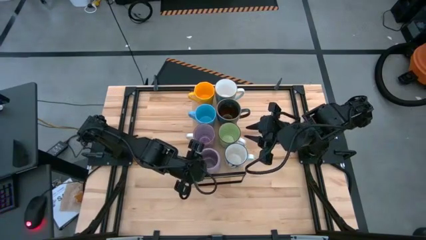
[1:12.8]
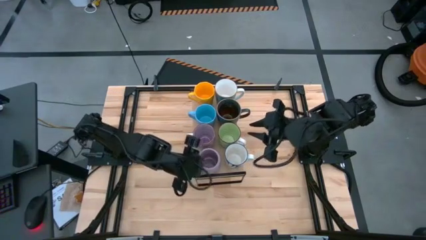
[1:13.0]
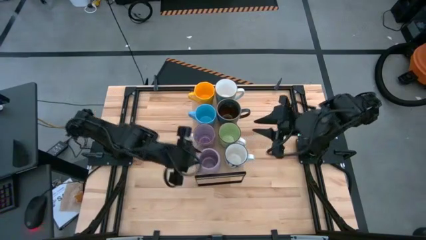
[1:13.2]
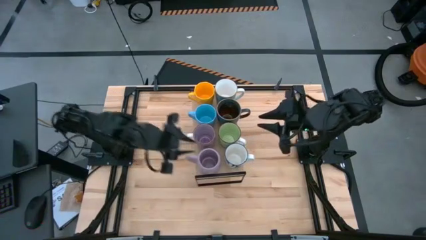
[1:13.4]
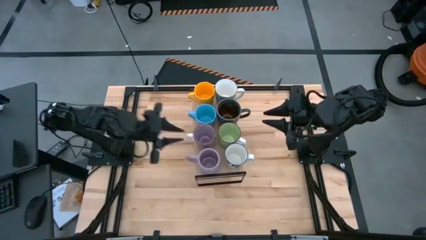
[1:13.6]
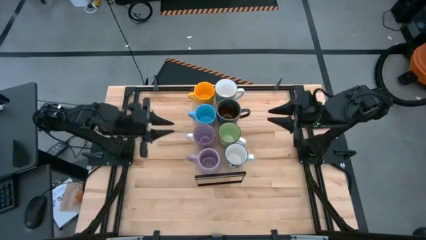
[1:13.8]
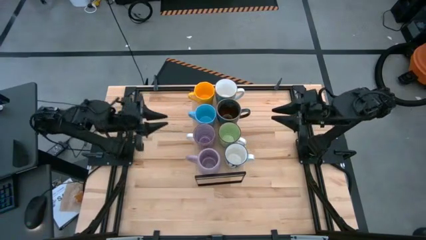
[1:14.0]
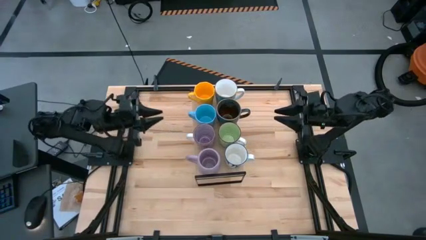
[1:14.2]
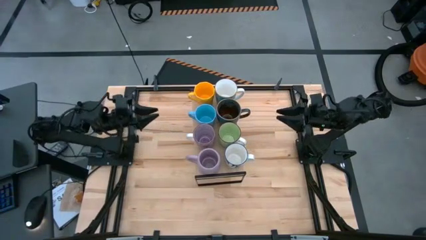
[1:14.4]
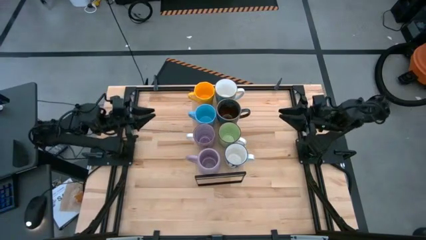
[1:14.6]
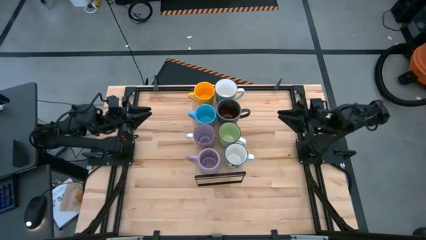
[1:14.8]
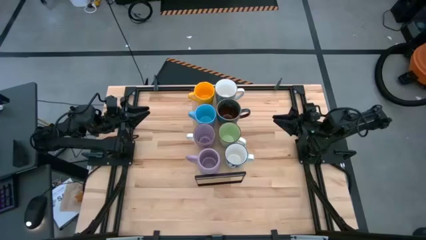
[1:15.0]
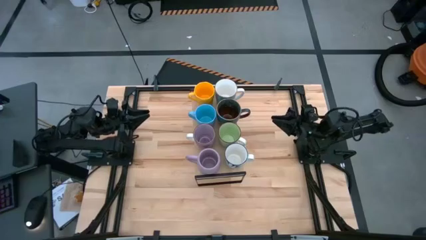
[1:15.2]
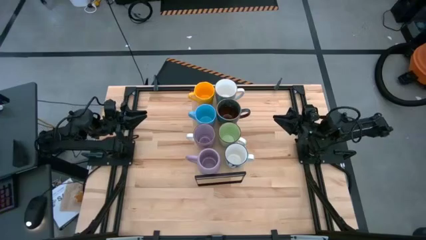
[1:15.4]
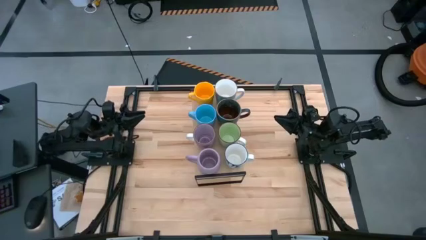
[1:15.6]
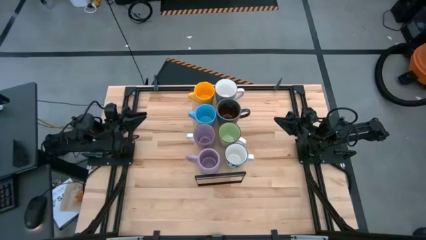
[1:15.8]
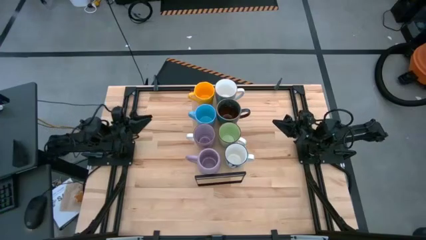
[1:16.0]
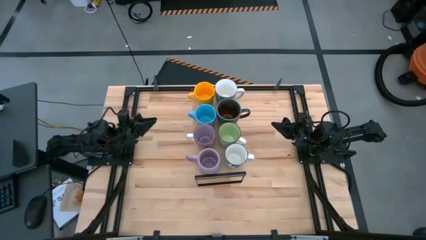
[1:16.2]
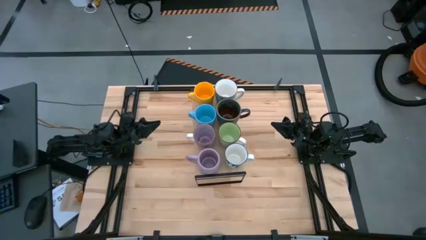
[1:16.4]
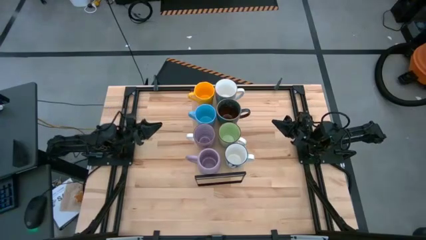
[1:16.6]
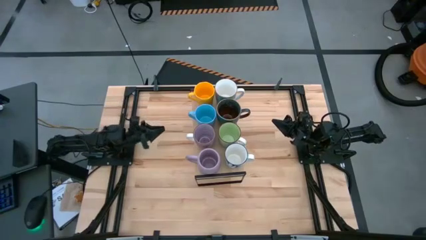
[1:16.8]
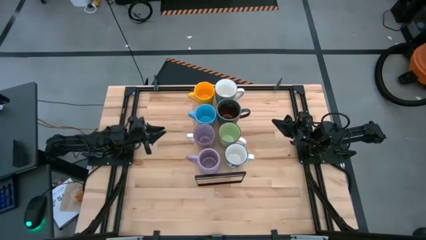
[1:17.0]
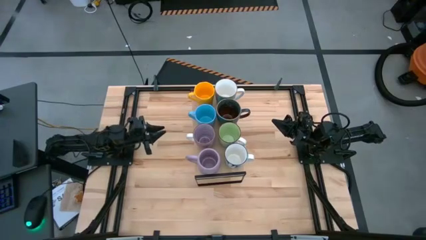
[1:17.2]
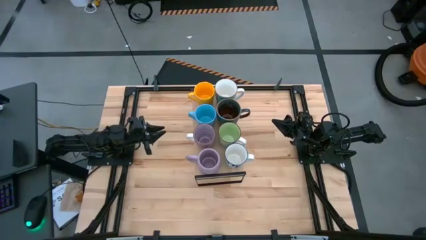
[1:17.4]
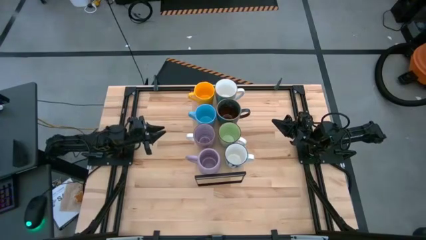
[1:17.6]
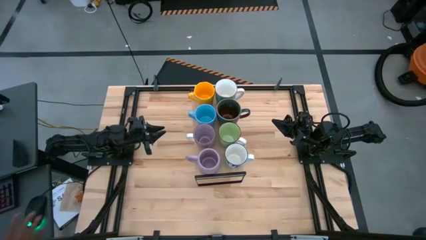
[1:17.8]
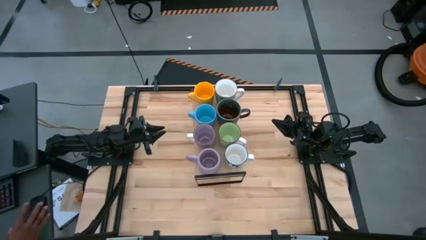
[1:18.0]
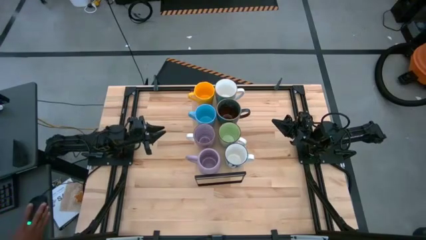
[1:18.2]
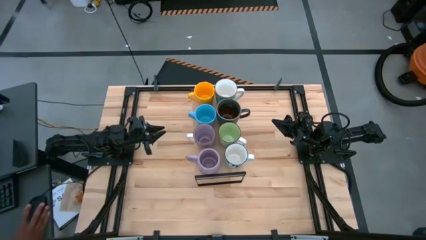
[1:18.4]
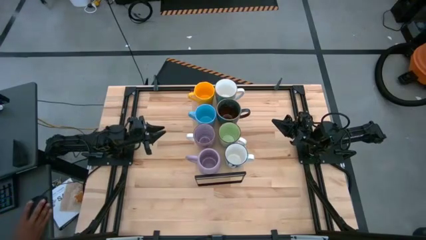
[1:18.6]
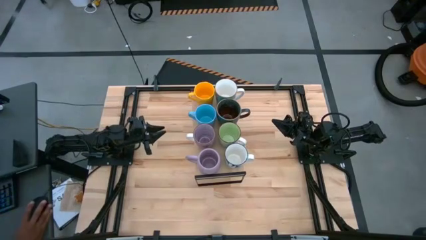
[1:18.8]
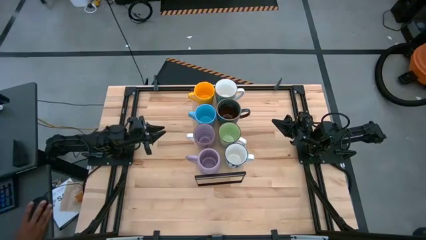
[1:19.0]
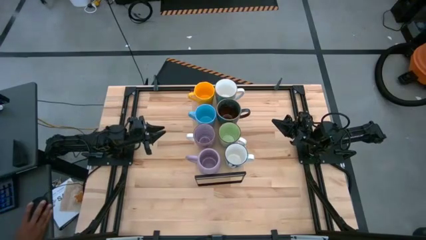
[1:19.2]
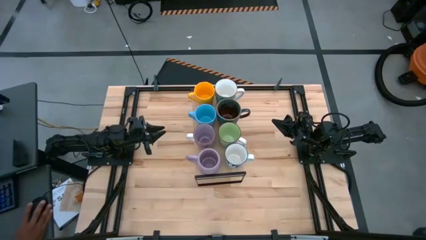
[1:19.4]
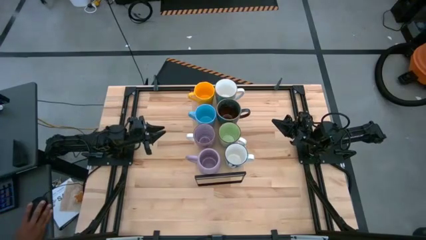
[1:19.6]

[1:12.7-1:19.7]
Task: Place coffee mugs
Return to Home Position

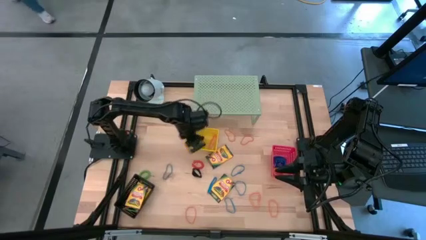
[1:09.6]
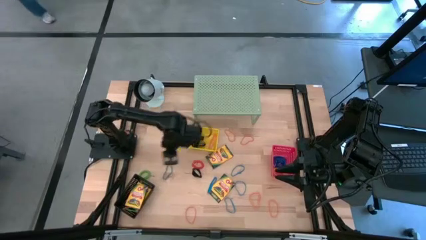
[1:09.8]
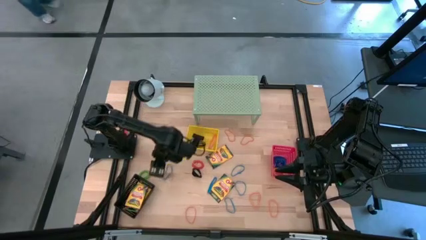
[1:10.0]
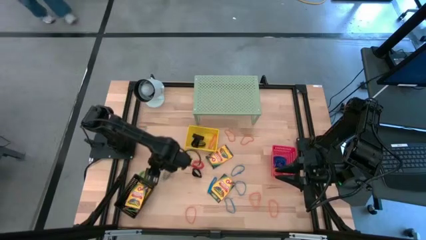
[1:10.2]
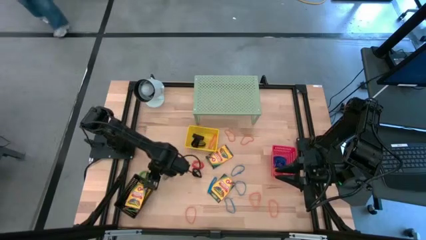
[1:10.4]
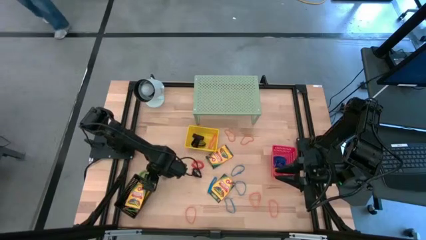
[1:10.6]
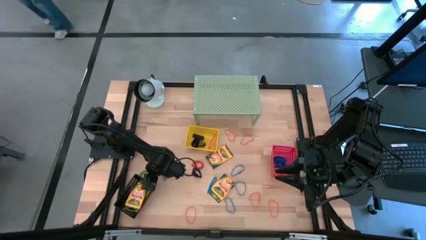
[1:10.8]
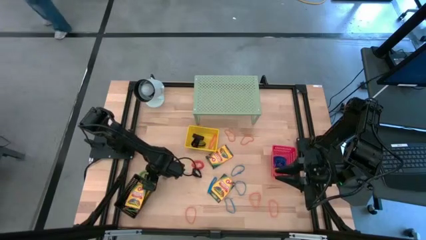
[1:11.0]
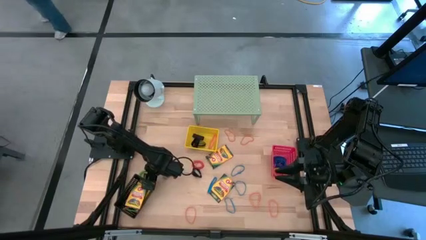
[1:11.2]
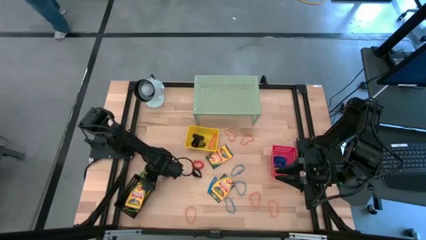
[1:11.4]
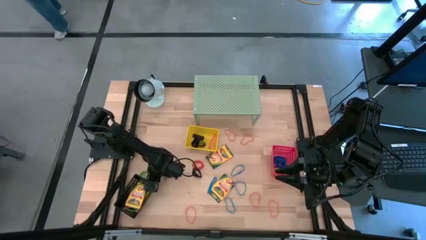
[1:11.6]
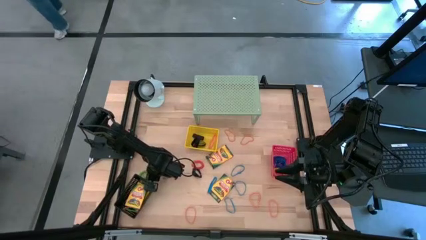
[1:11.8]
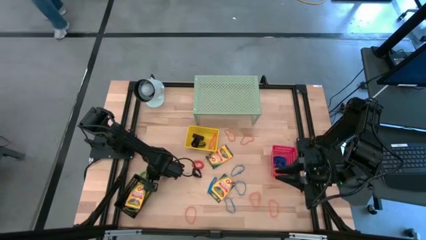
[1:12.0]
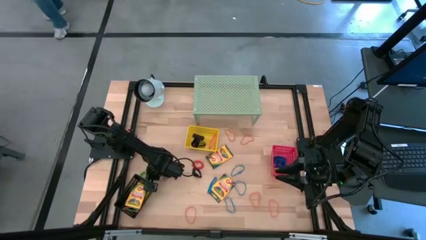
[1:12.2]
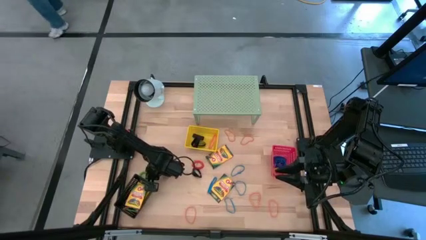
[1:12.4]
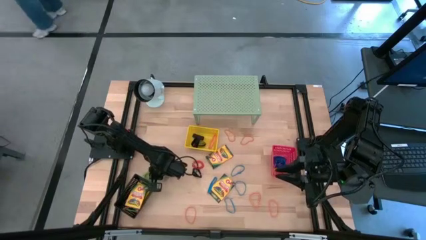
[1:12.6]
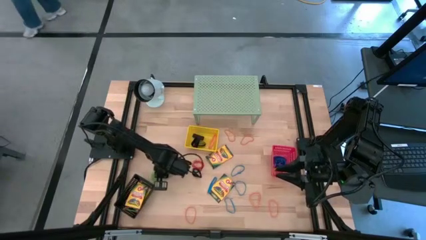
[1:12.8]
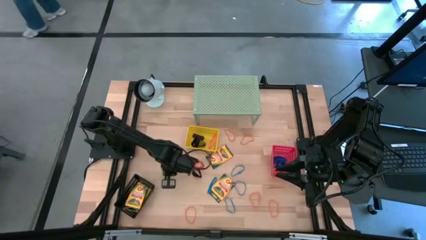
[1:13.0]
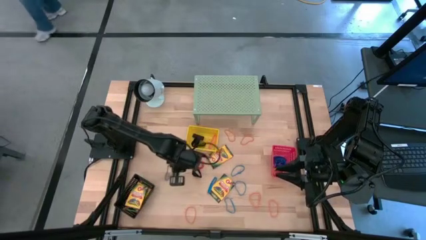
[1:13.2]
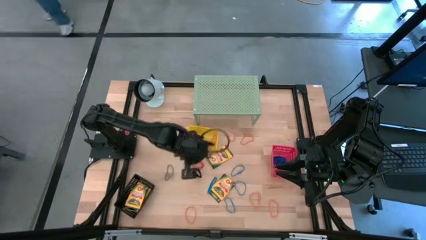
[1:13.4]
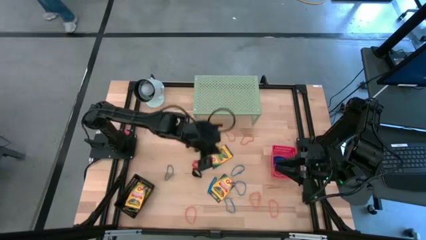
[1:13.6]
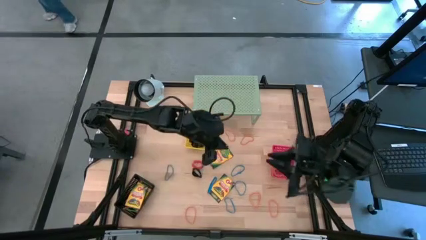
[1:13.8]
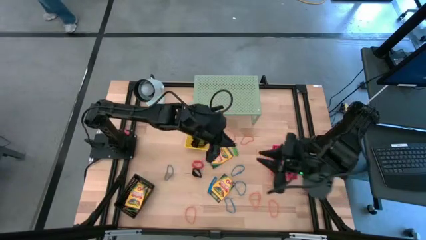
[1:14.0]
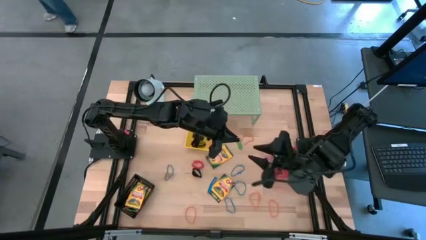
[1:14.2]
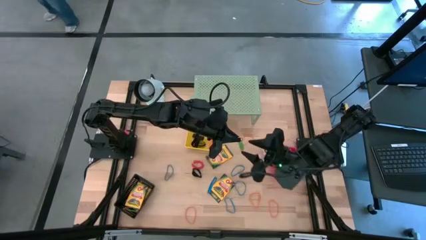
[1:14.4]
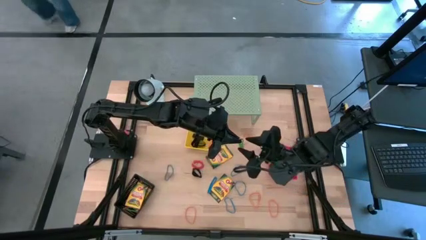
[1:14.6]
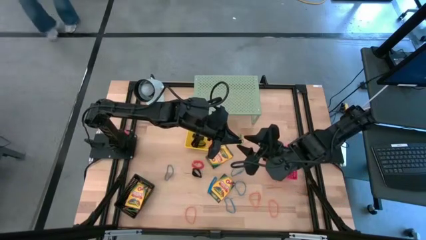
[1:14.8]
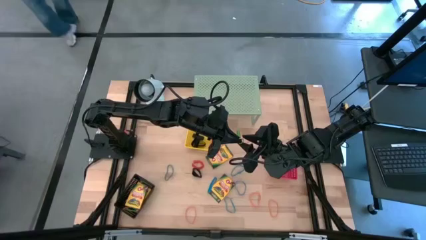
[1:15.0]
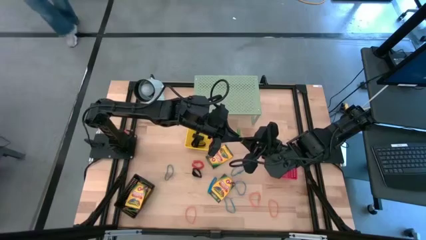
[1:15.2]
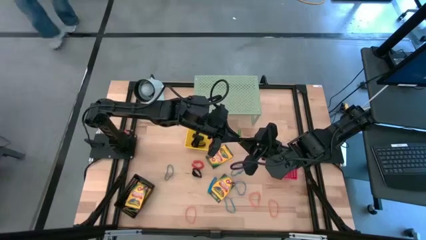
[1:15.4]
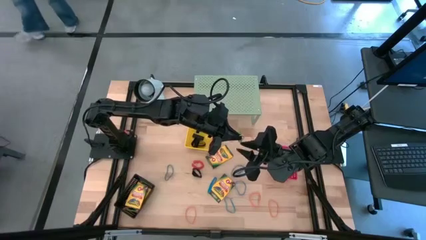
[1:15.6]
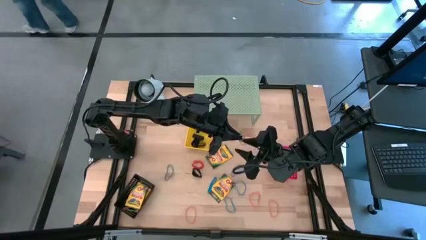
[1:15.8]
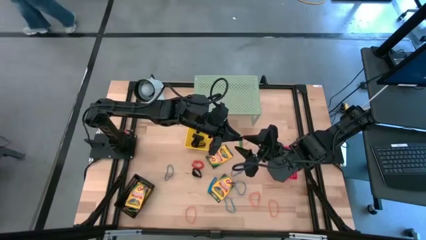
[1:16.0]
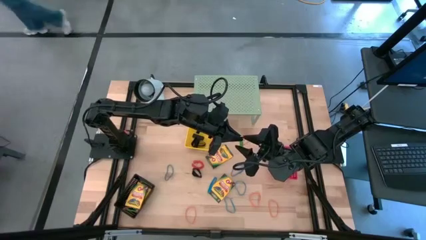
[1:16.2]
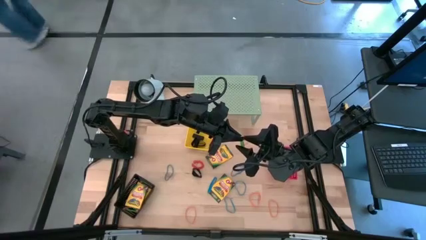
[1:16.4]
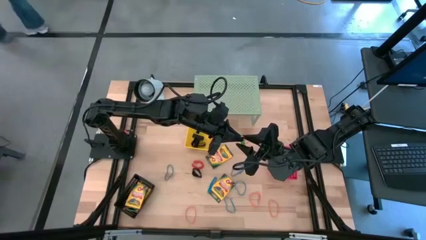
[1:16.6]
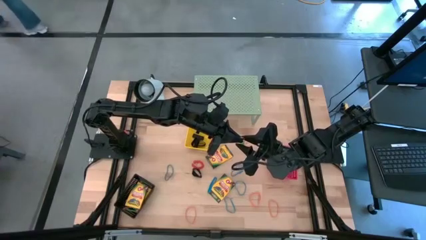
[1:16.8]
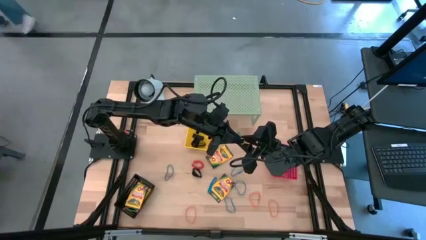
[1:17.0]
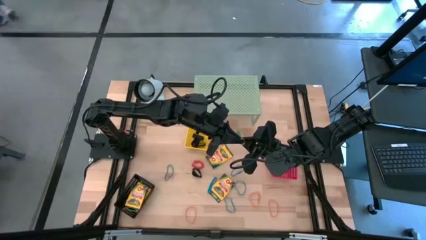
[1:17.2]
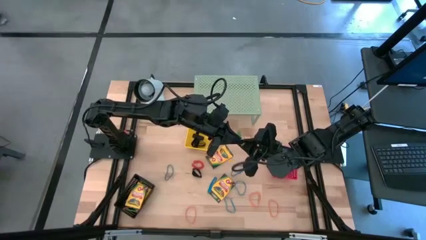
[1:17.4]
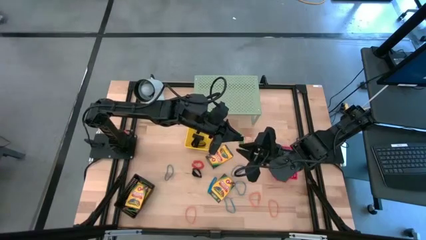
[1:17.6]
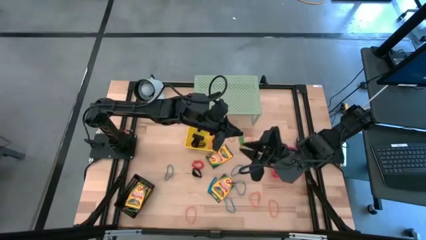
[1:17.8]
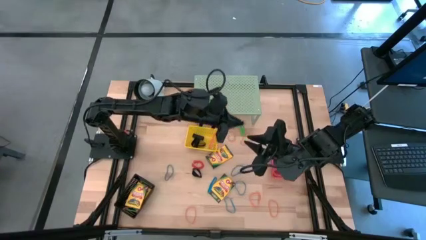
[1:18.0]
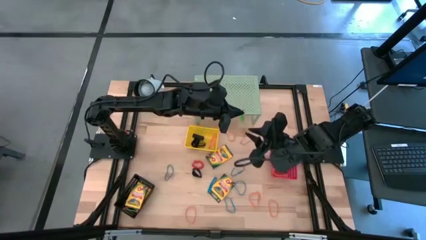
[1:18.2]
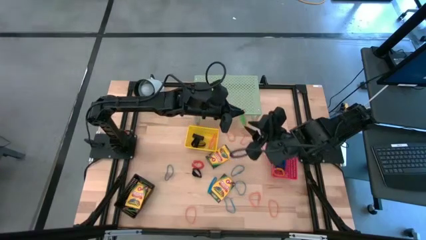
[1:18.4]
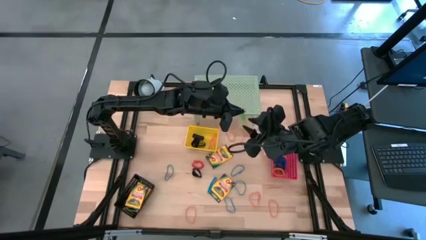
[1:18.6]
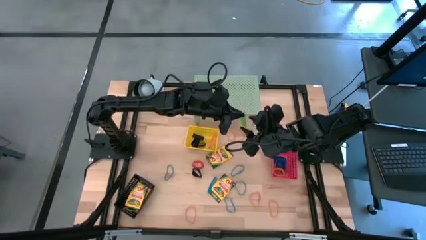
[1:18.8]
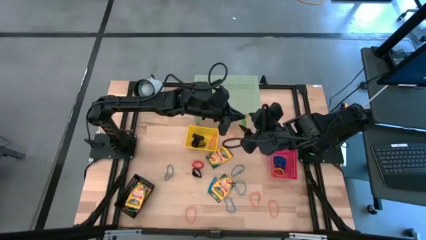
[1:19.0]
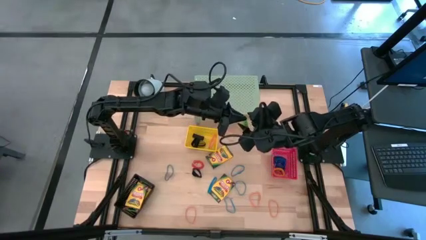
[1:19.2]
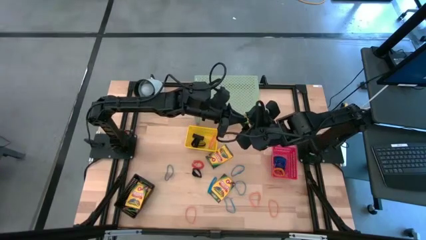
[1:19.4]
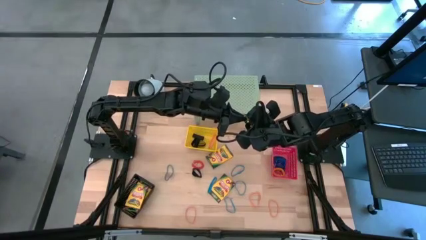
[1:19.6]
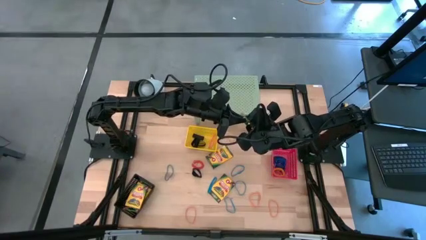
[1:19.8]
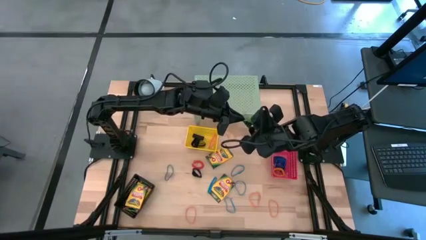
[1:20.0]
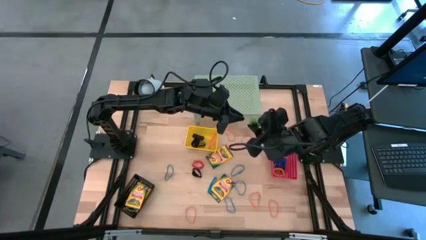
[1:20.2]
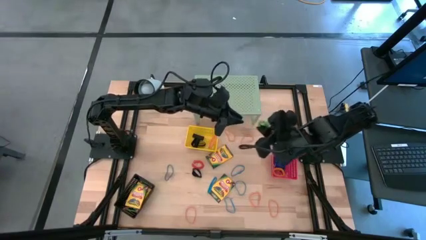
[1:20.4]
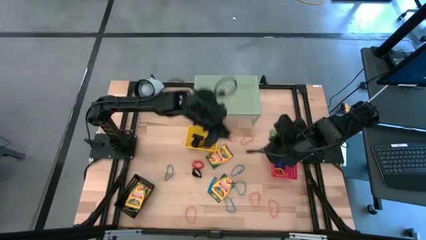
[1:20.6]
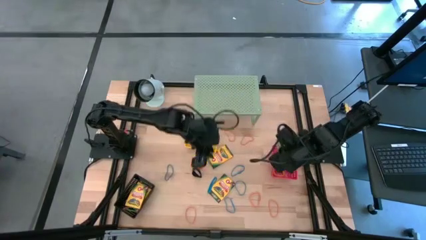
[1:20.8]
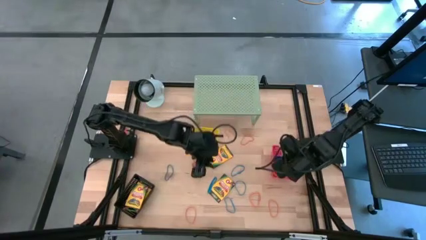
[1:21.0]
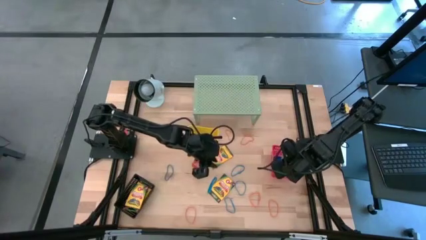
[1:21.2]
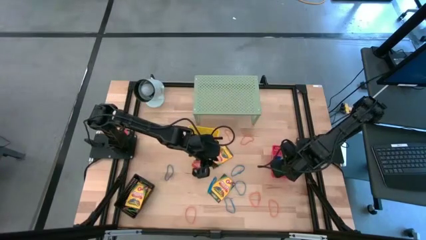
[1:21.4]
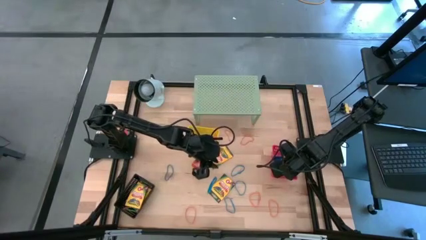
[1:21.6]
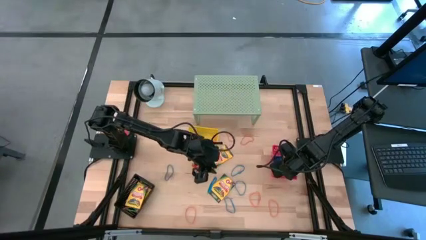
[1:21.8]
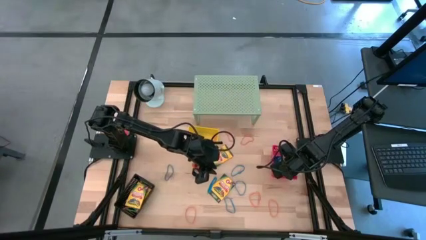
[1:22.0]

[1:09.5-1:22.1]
Task: Pick & Place Office Desk Supplies
Put the green spring keychain into the red bin
